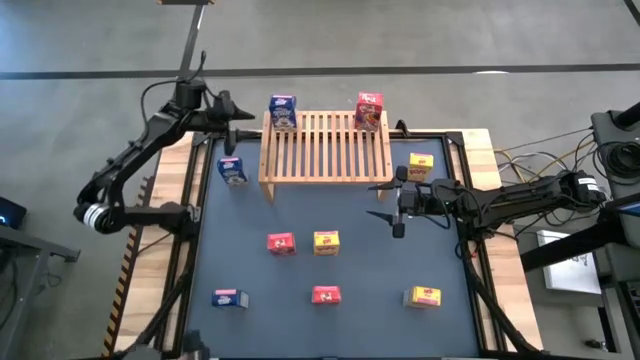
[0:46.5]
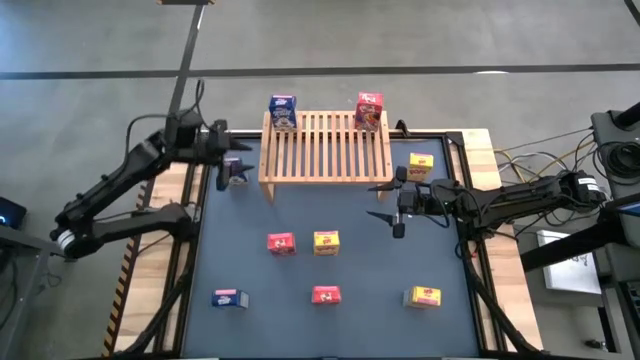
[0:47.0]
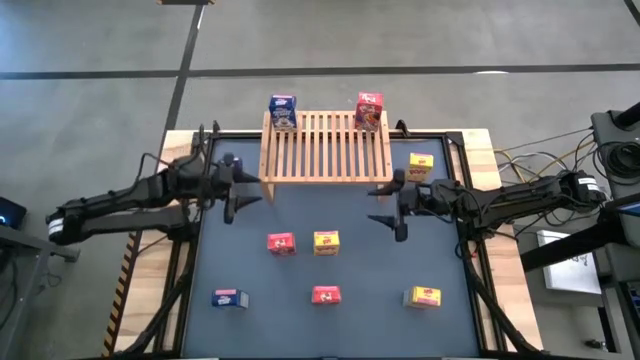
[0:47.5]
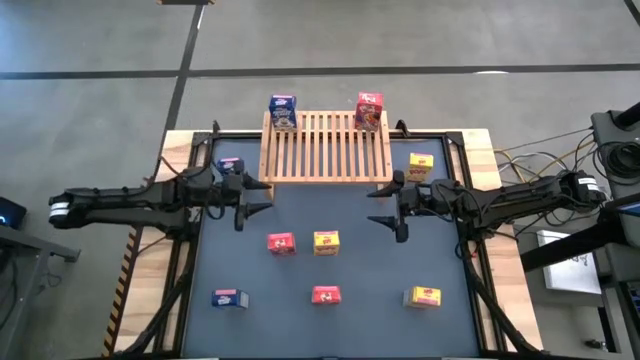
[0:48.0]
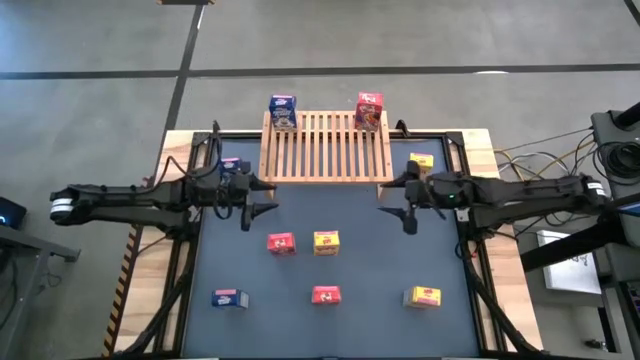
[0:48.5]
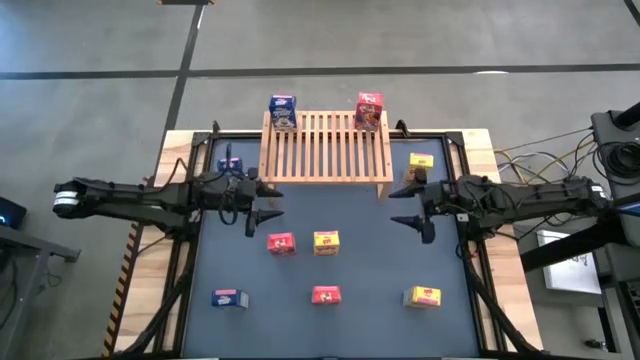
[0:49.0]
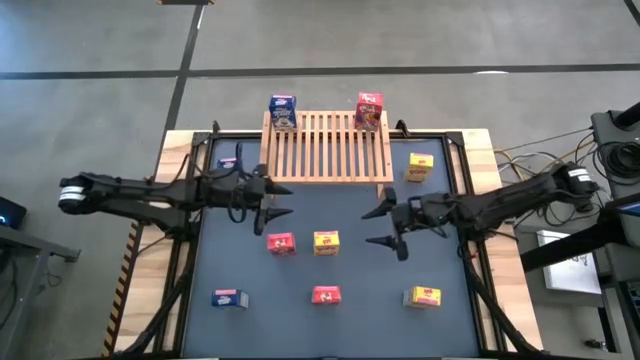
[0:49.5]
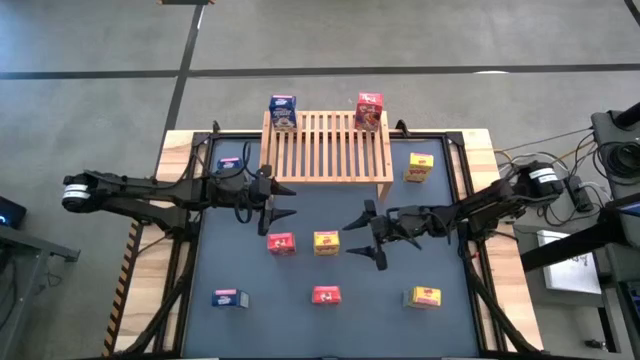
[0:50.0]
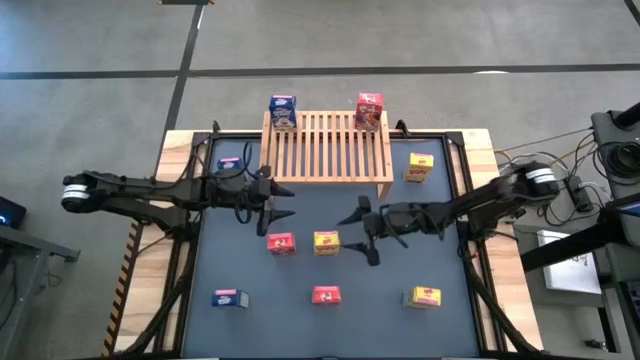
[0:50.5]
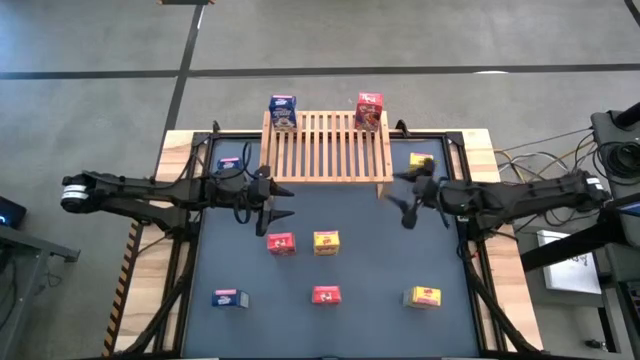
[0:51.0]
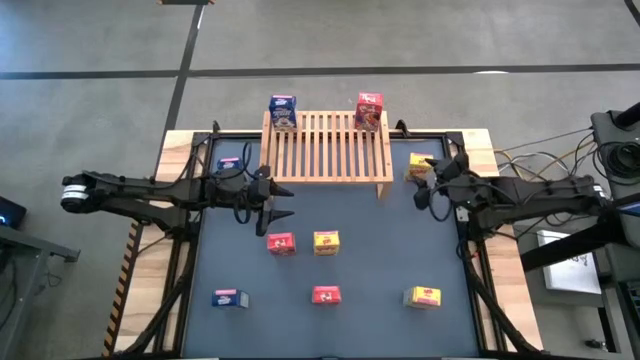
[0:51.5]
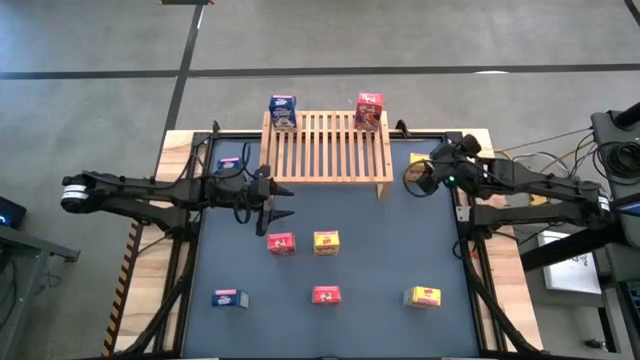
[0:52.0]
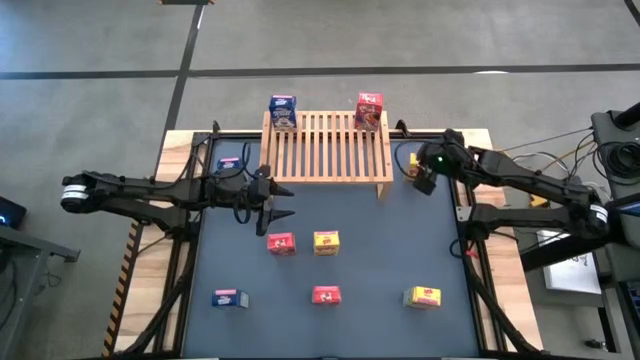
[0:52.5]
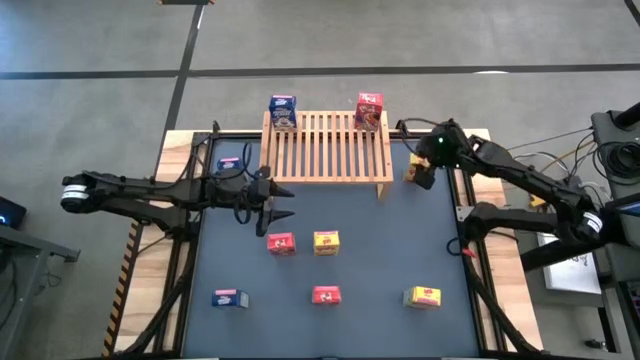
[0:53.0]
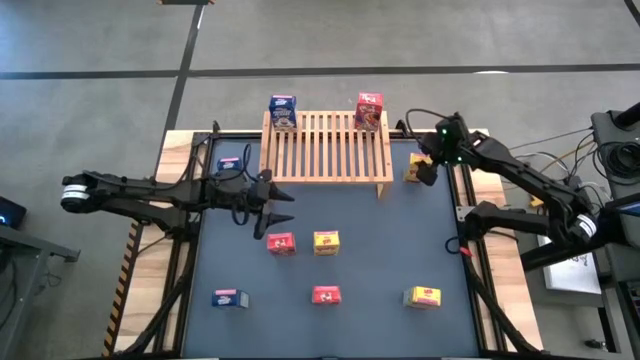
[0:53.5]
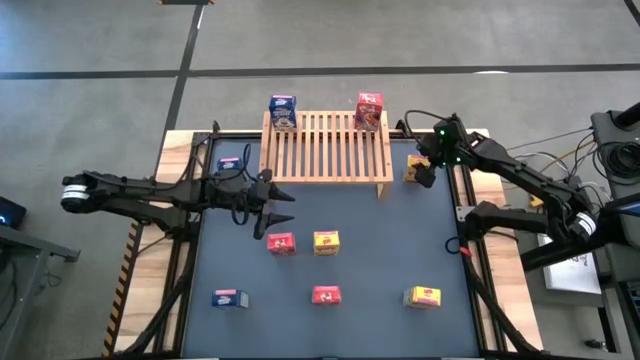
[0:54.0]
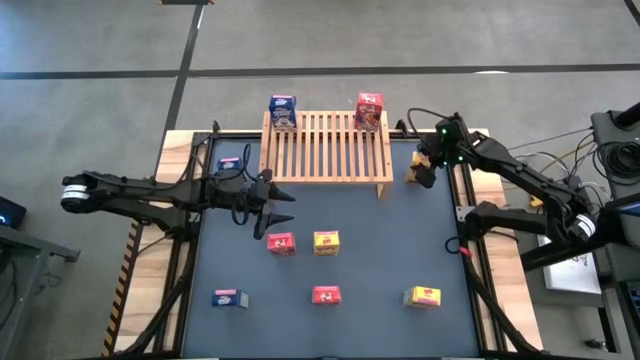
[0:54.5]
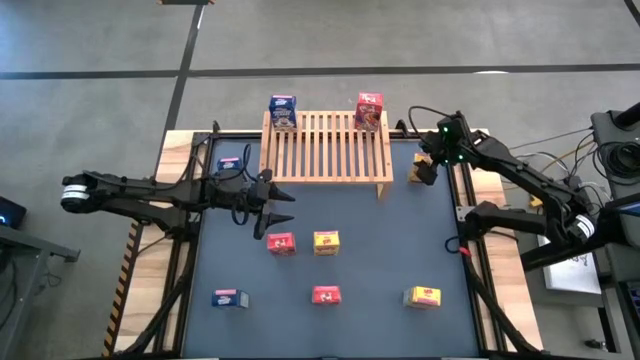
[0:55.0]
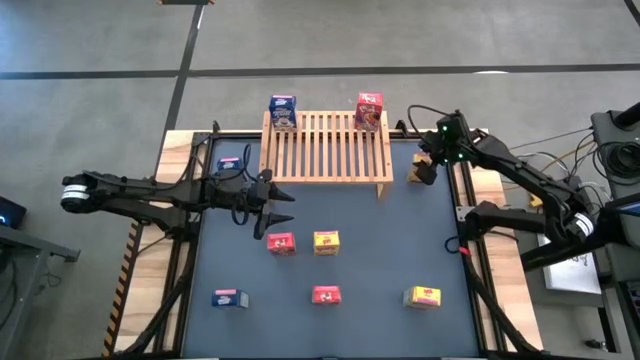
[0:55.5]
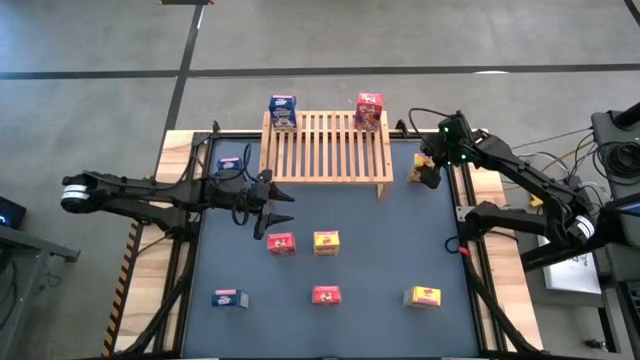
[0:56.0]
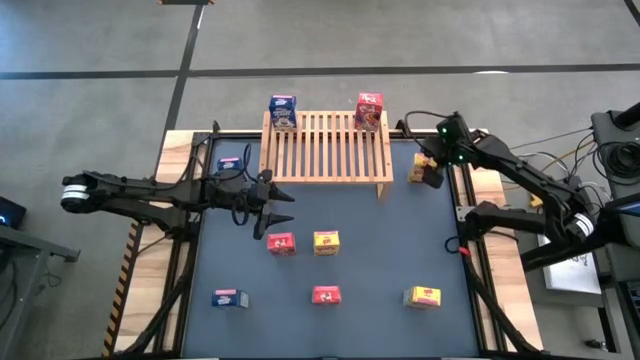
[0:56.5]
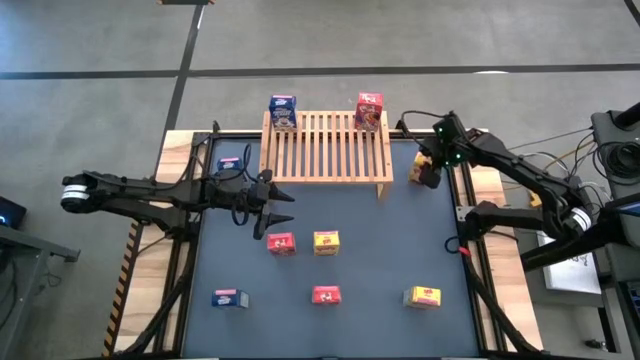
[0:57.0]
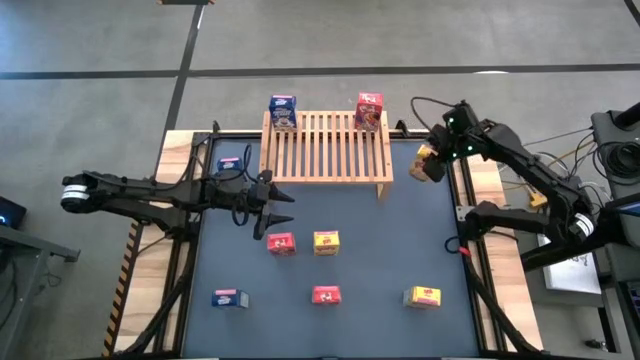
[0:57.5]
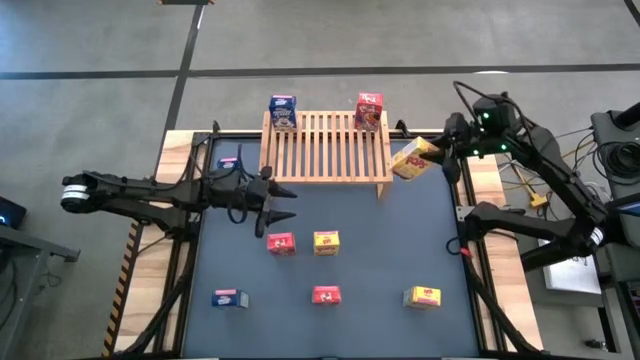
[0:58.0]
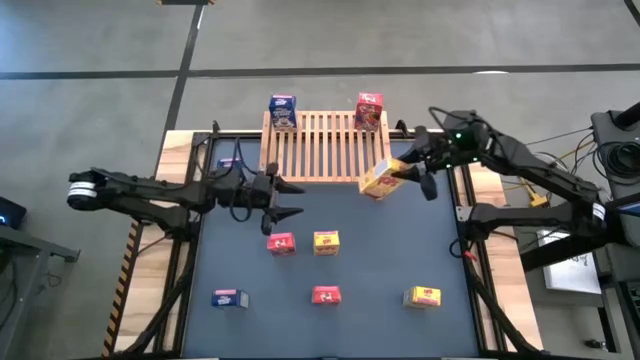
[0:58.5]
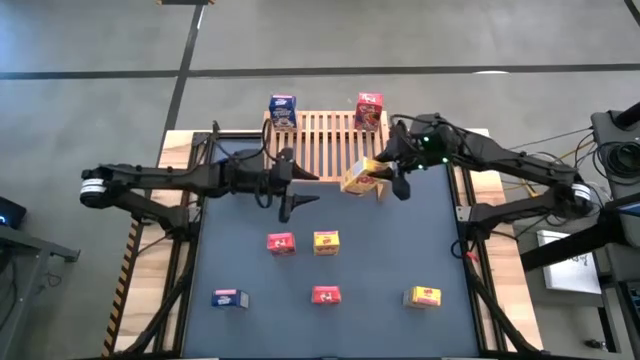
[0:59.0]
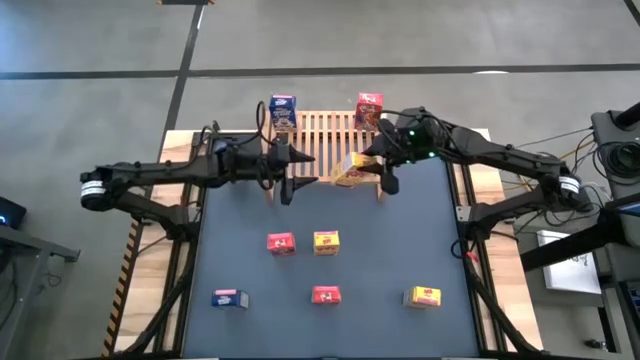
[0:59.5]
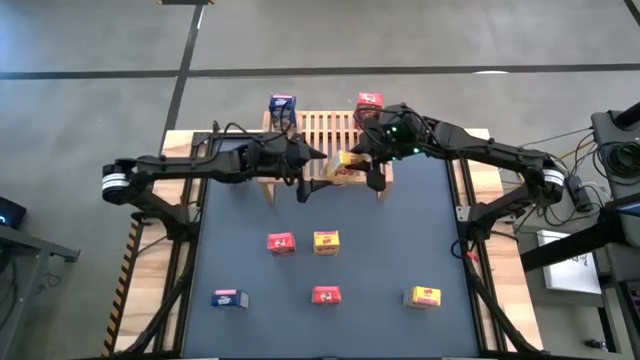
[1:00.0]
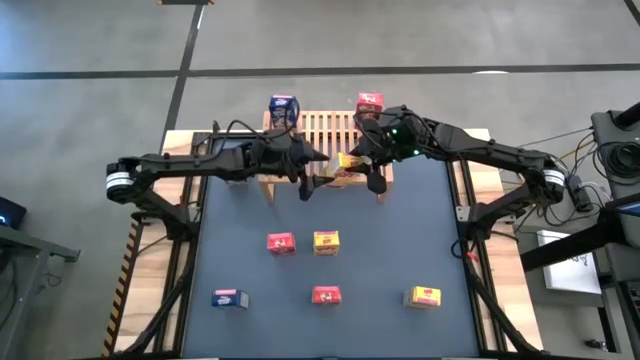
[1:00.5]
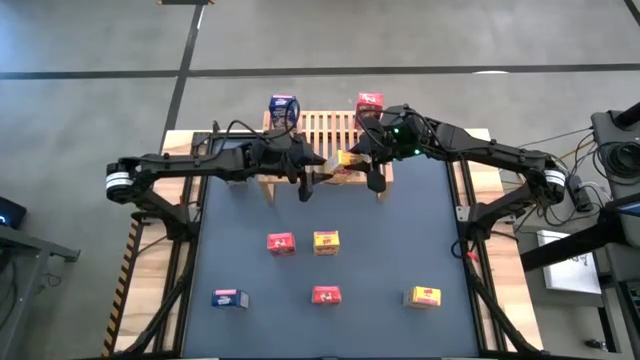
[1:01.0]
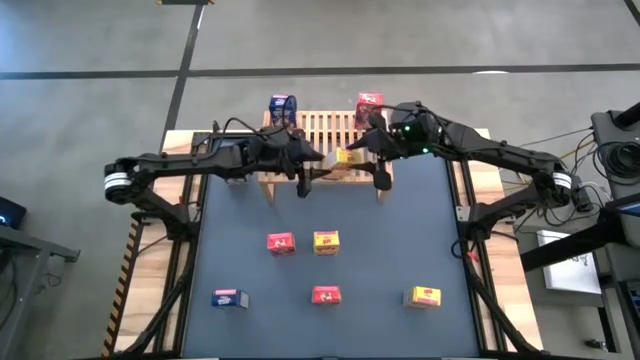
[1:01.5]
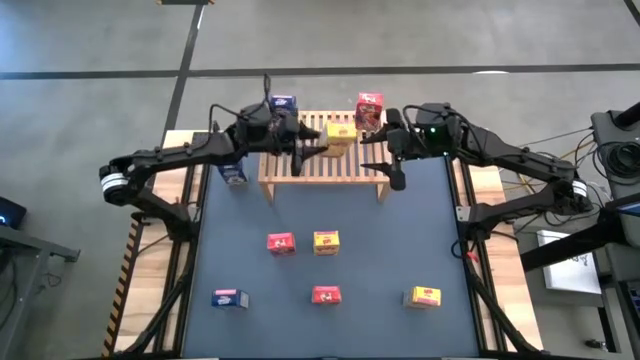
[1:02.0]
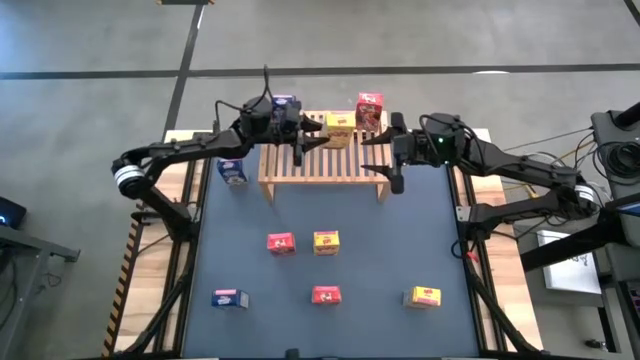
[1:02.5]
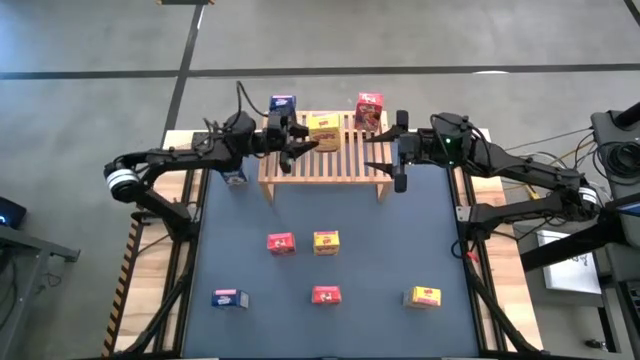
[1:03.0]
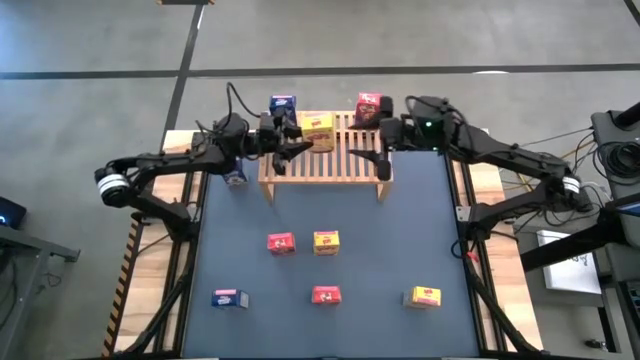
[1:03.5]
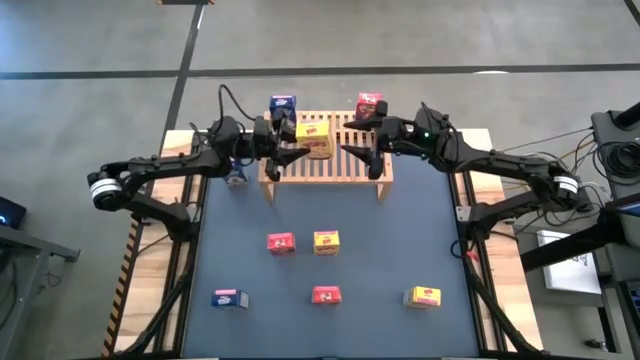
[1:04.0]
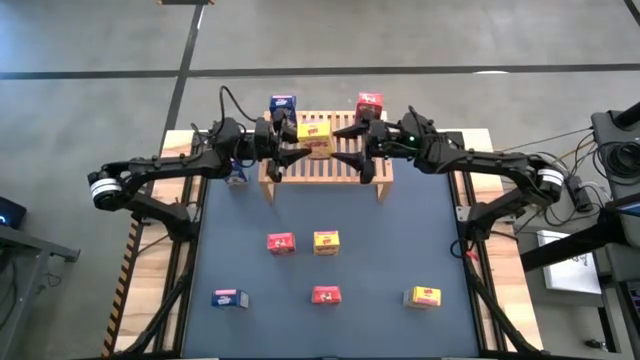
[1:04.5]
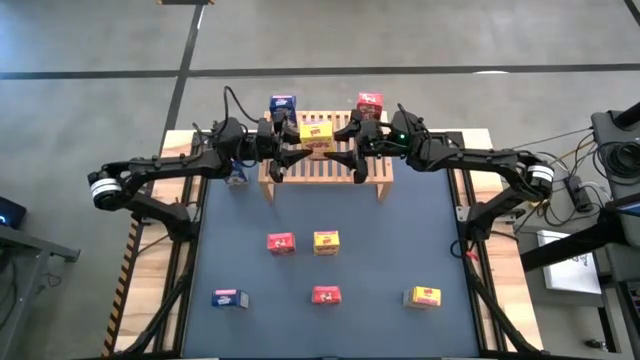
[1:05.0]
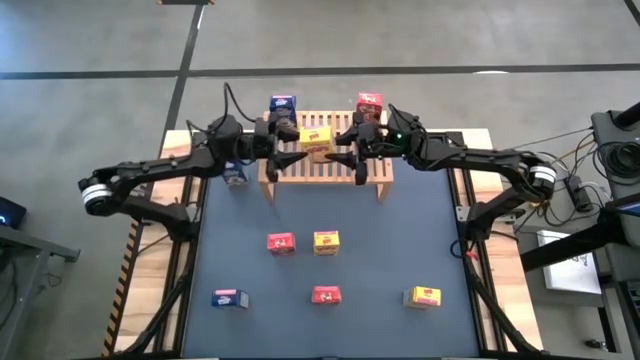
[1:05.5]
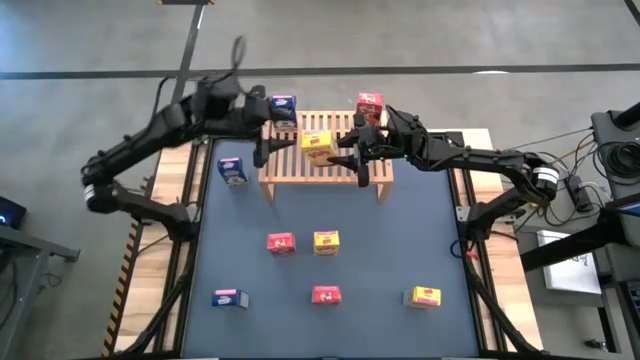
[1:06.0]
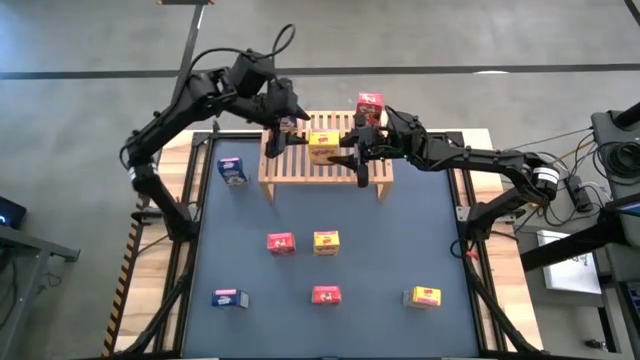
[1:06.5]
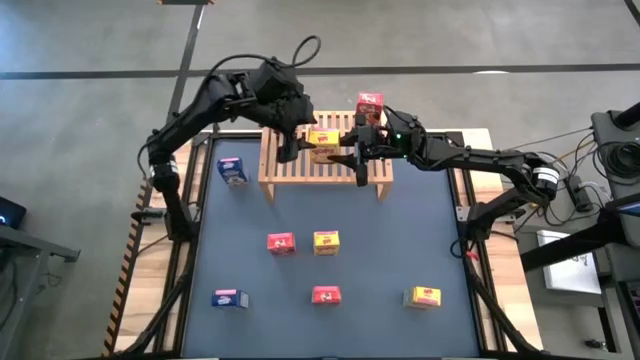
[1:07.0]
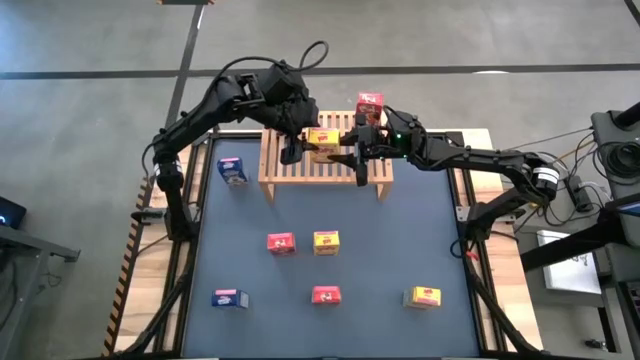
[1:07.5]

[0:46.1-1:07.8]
Task: Stack cereal on shelf
Put the top yellow cereal box on the shelf
